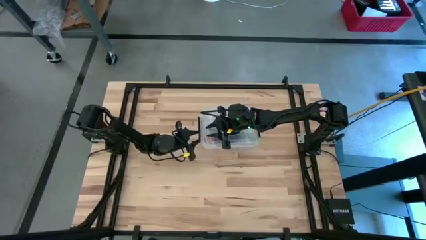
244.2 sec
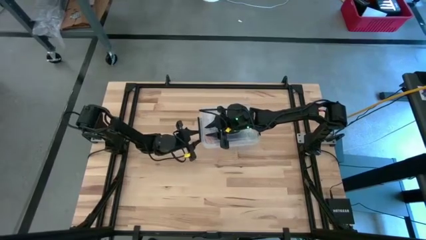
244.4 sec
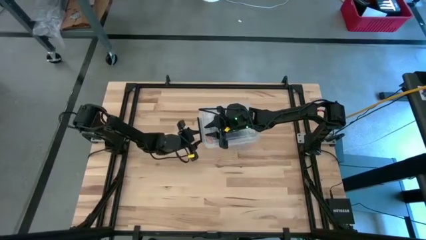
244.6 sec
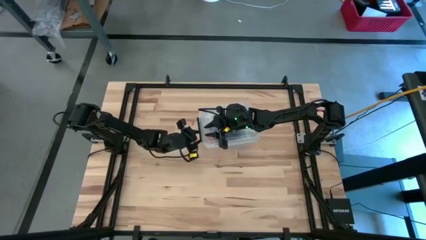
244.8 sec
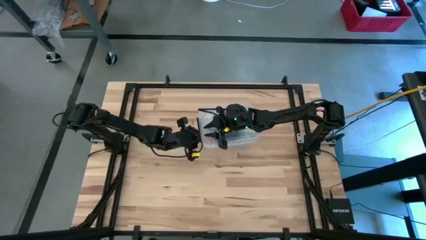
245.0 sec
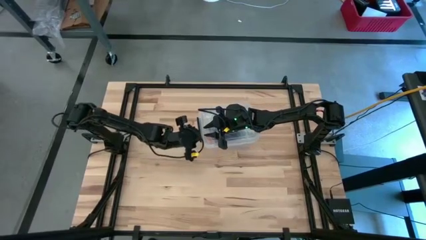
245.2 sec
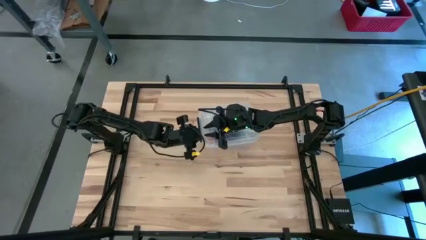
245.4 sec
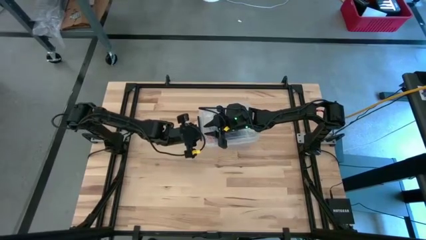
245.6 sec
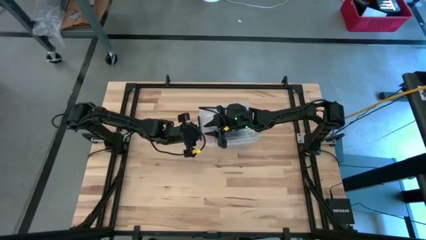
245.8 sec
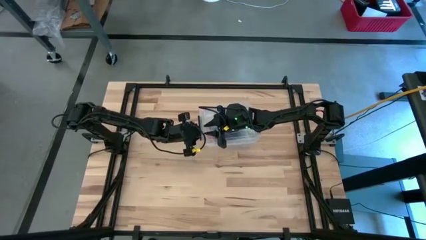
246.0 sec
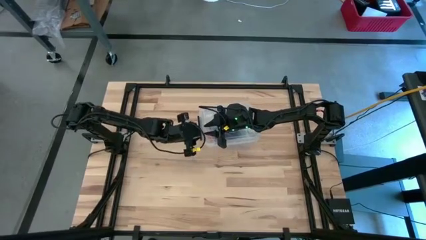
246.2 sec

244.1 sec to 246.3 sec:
Task: Roll bandage
Close the transparent bin

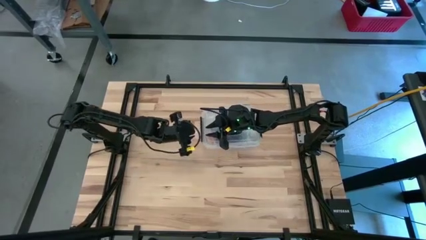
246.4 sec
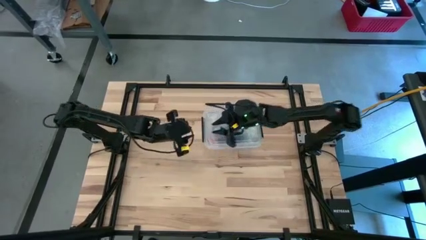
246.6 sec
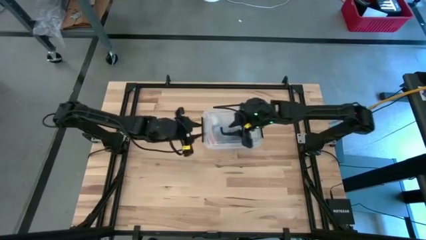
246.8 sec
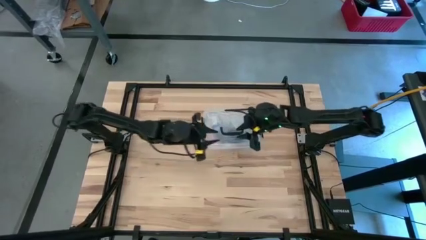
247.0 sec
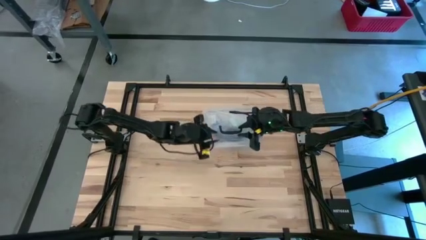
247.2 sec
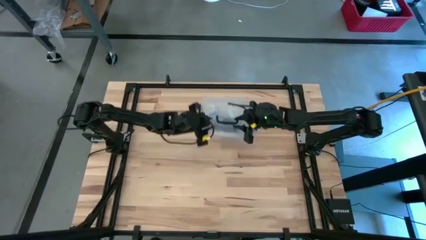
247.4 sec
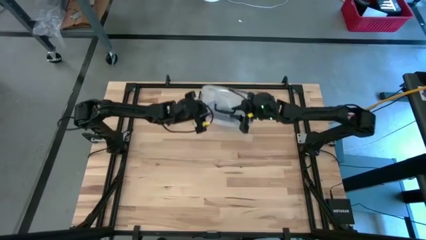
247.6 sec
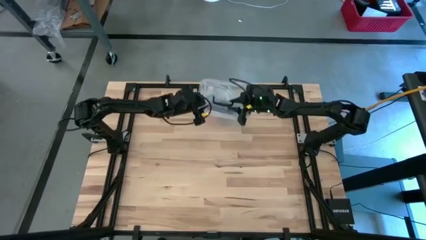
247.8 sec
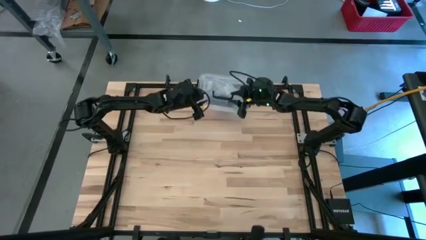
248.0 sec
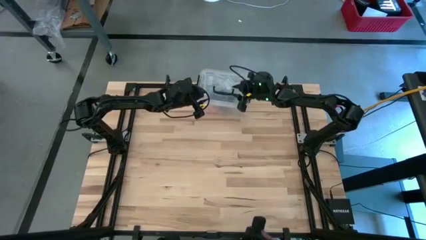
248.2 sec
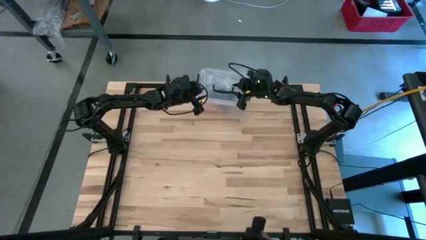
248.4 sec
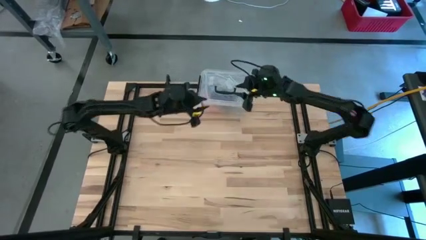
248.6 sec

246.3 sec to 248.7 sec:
Move the transparent bin to the top

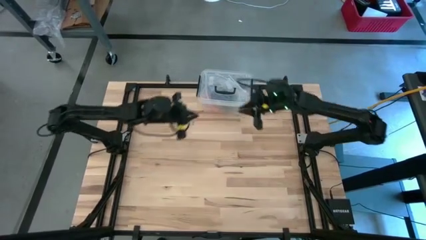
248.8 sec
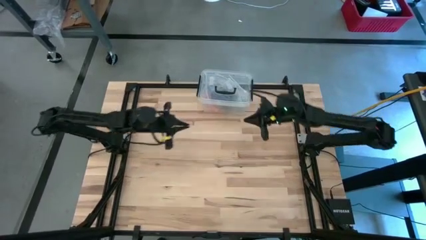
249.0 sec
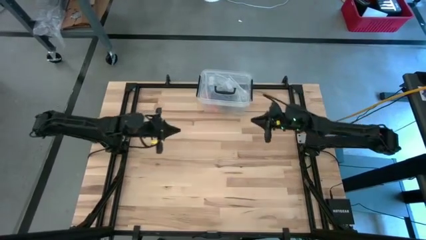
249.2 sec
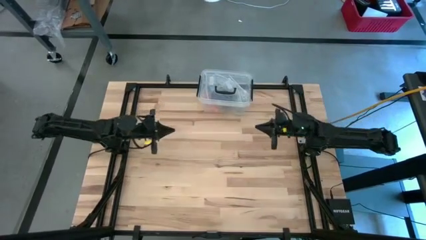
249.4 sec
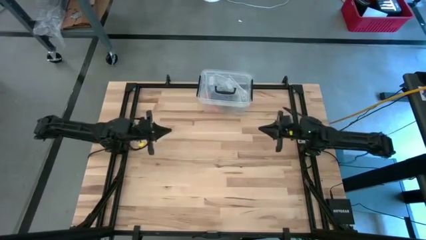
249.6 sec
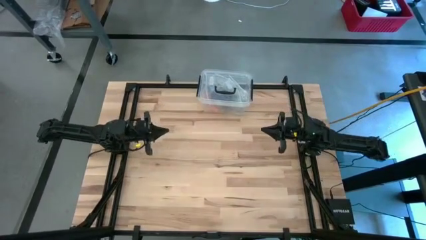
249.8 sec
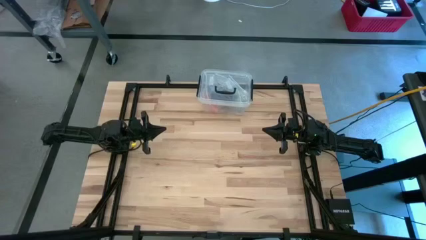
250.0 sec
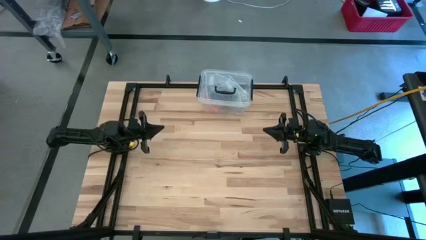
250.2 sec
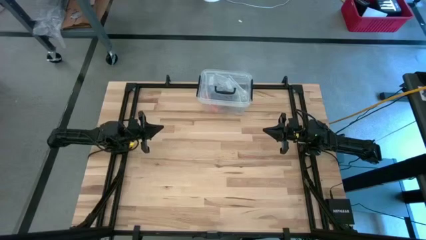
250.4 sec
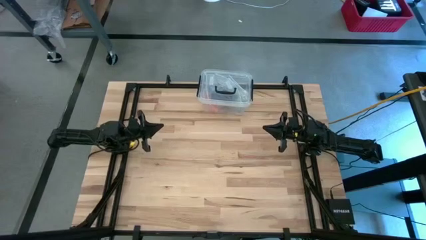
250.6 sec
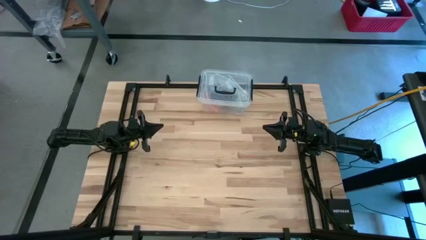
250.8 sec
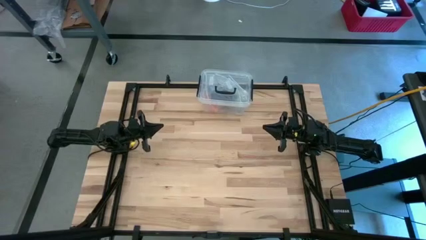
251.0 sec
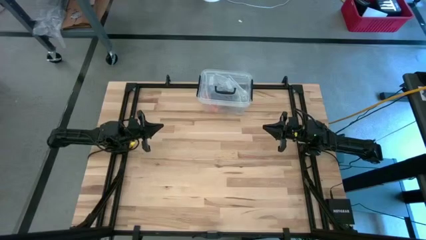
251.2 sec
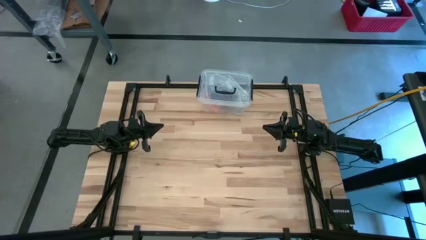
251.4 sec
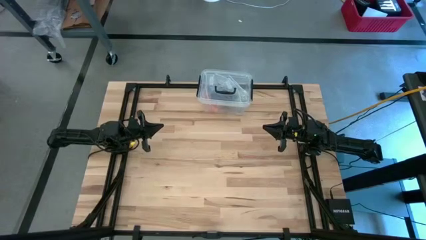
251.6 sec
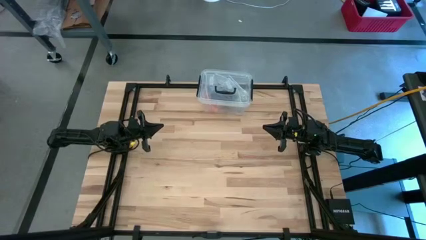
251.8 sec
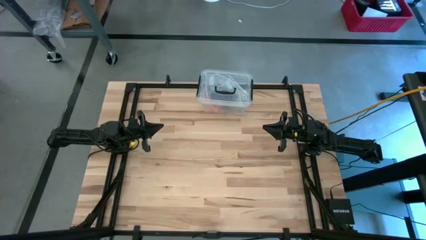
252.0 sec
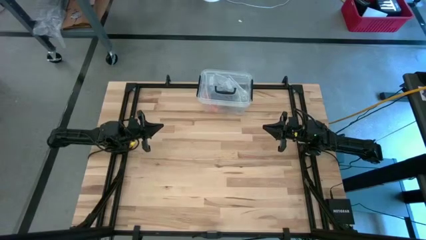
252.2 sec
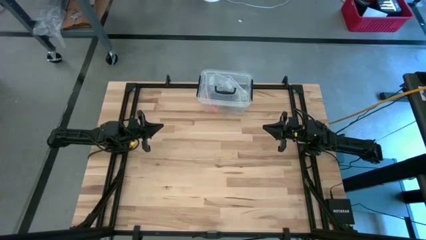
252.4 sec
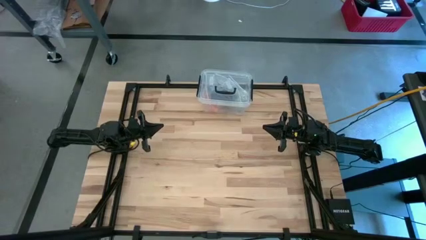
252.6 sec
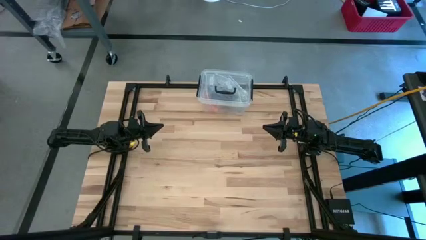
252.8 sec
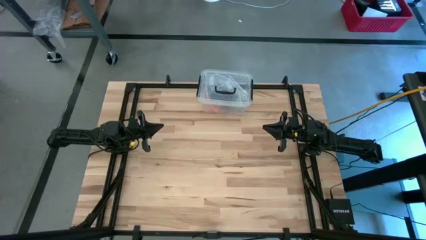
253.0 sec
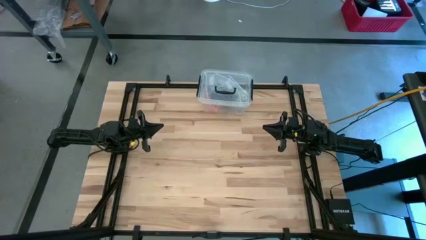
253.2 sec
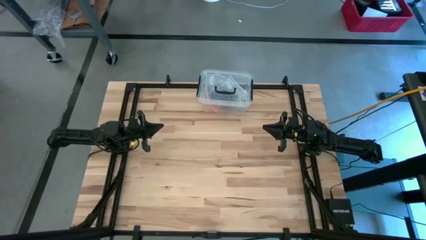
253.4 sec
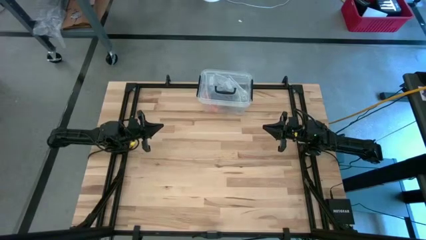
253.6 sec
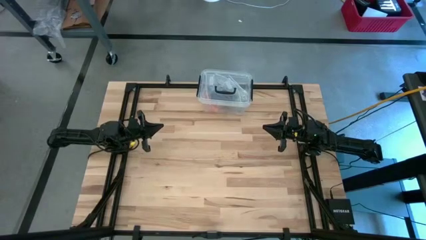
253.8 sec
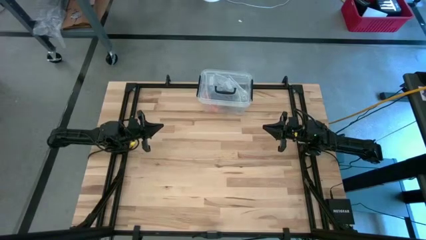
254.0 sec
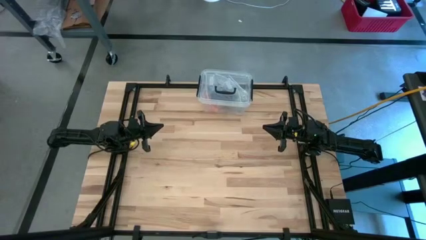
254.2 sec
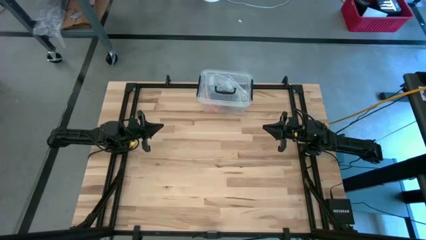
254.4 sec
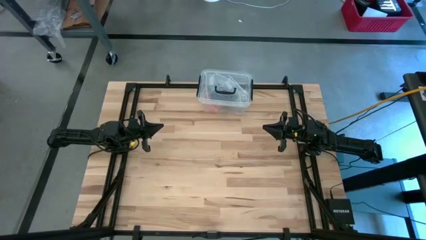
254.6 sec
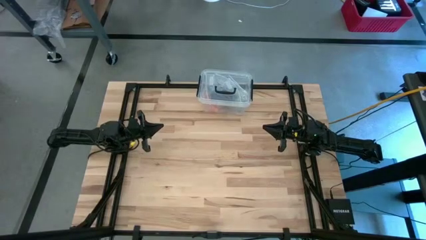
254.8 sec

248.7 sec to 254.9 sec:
Return to Home Position

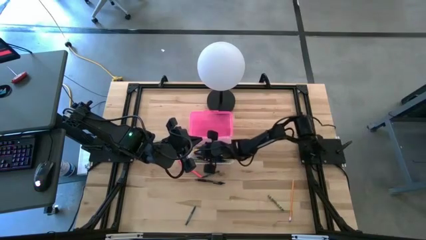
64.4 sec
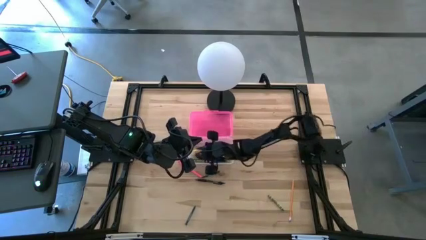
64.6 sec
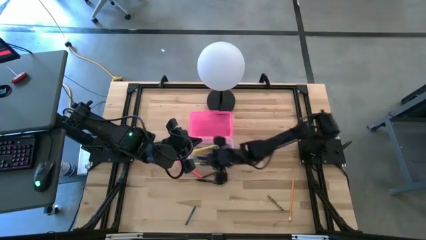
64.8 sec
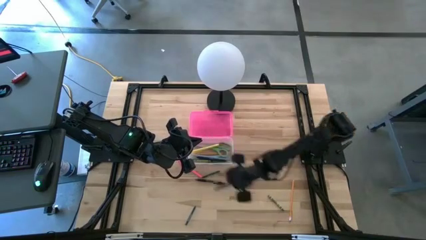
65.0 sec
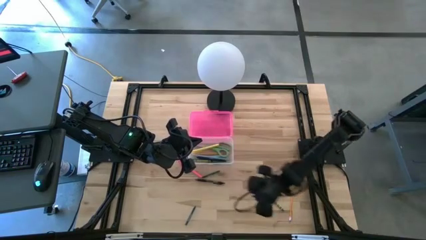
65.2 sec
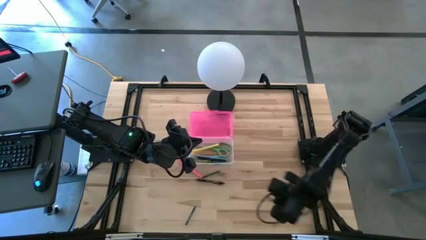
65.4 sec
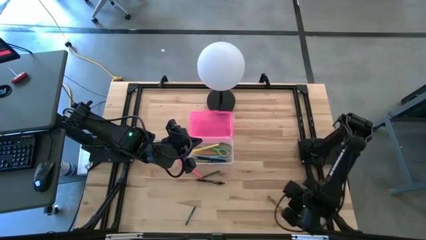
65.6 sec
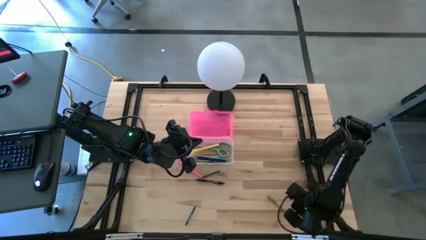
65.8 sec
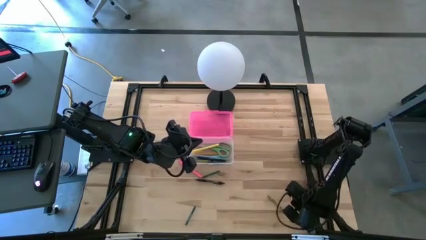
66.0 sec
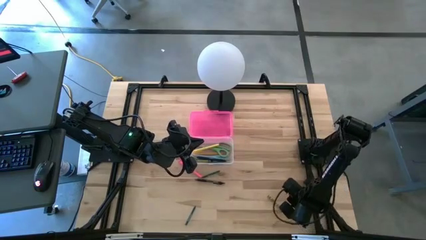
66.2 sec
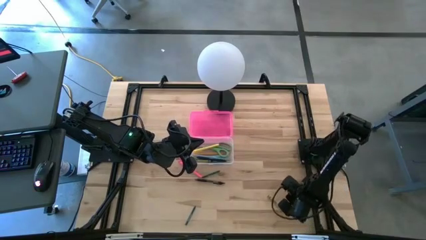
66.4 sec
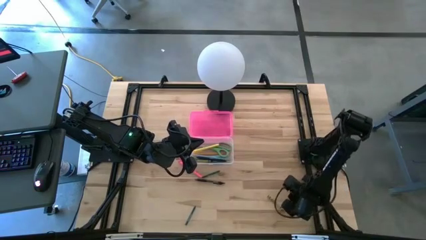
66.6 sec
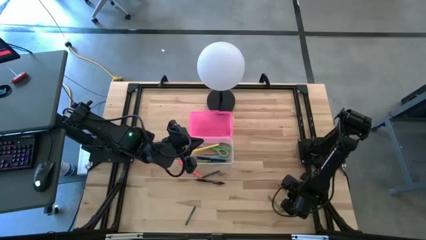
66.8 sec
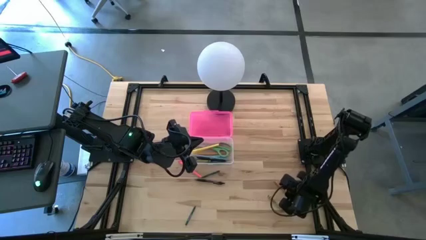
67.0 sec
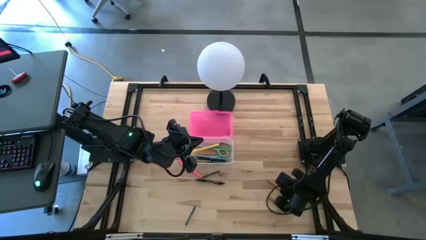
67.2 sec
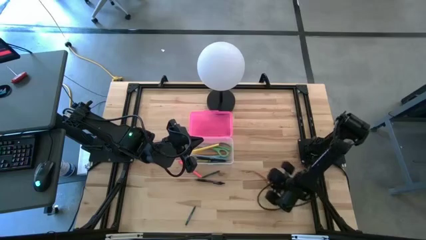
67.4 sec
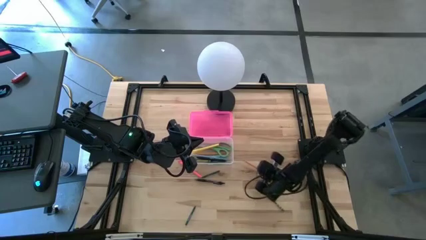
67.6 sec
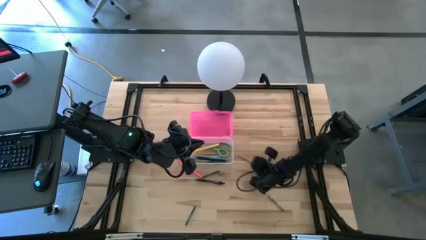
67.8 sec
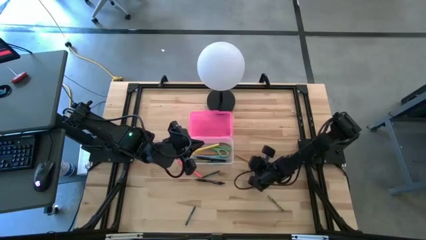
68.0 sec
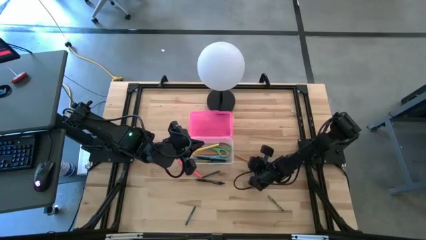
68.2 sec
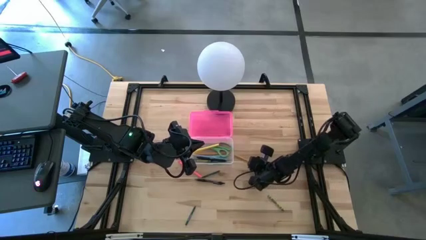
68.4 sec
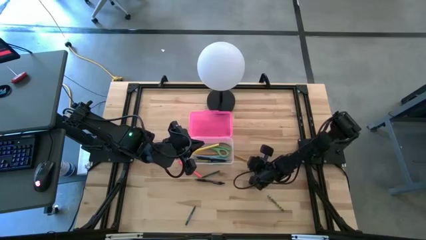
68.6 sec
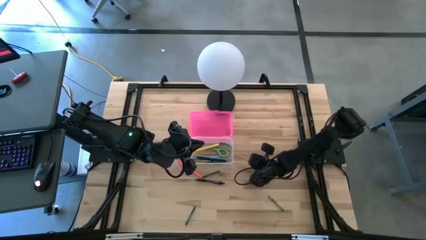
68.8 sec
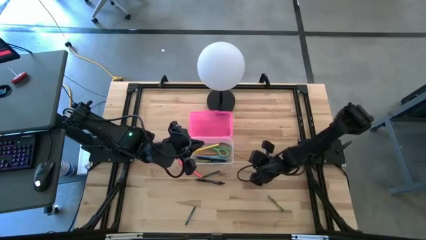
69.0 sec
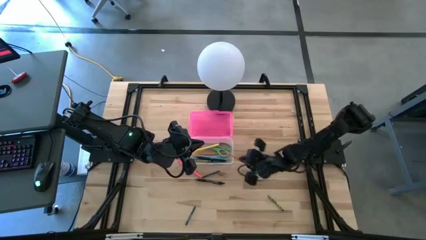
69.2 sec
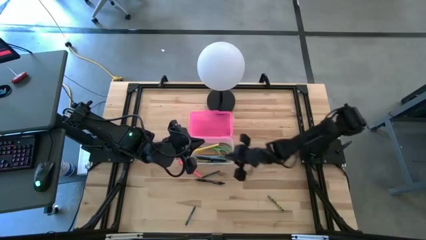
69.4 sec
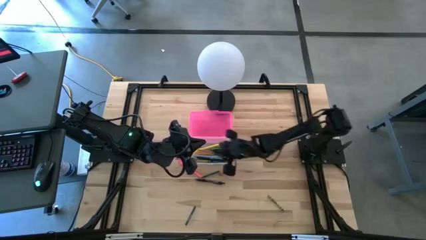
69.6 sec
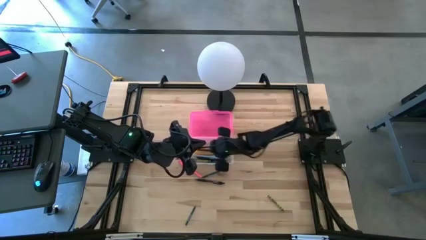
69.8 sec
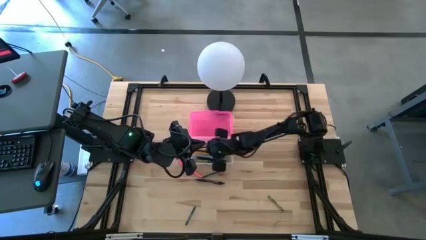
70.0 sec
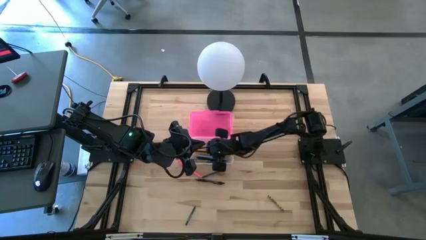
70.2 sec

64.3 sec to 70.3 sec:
Task: Pick & place school supplies into a supply box
Put the orange pencil into the pink supply box
